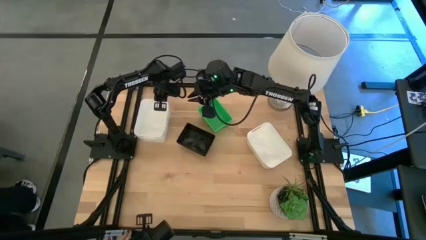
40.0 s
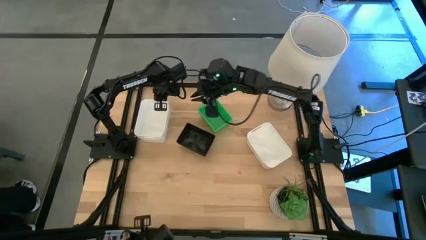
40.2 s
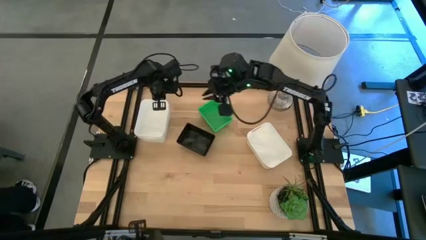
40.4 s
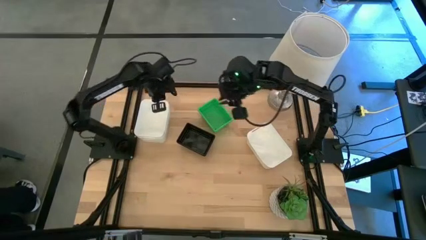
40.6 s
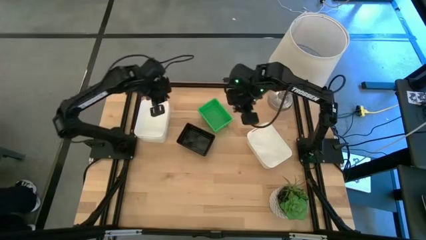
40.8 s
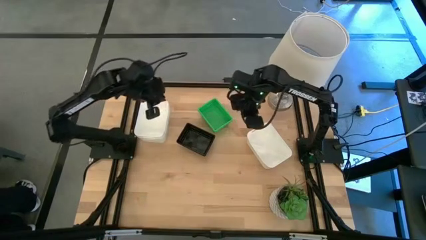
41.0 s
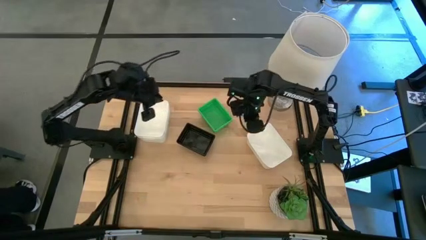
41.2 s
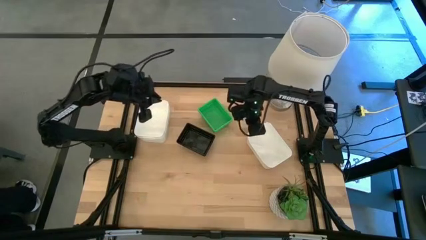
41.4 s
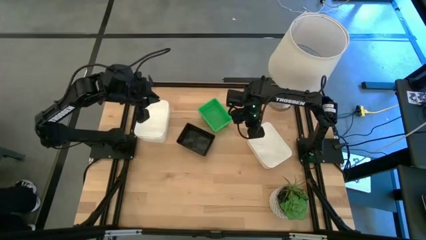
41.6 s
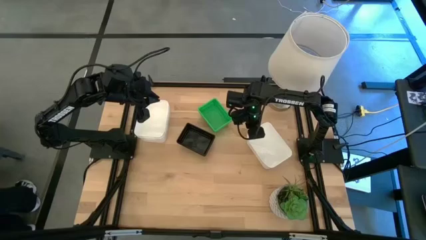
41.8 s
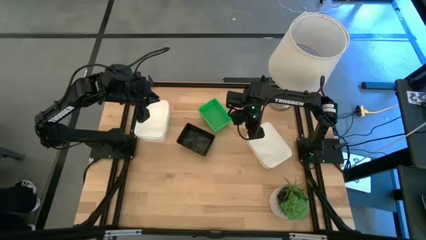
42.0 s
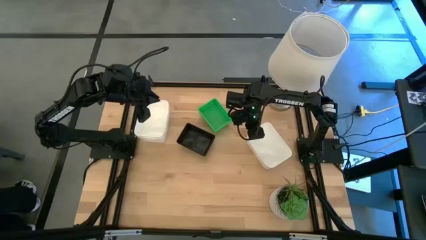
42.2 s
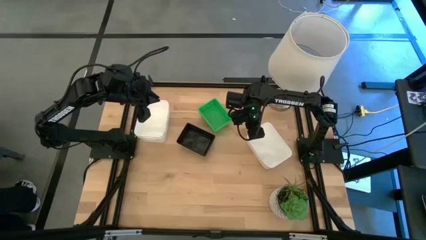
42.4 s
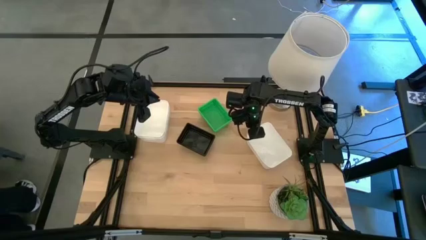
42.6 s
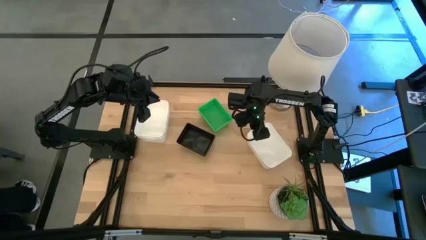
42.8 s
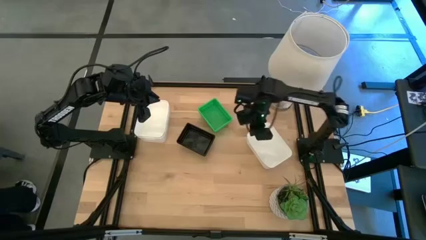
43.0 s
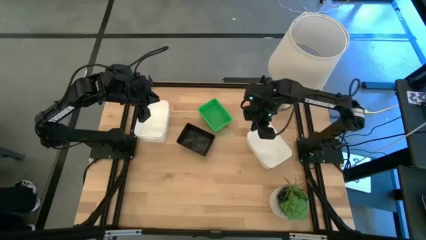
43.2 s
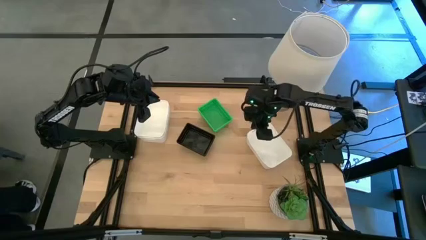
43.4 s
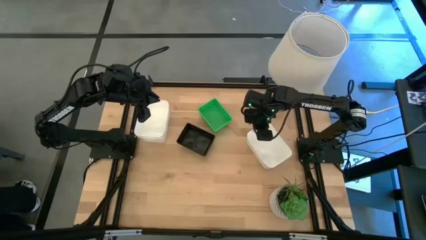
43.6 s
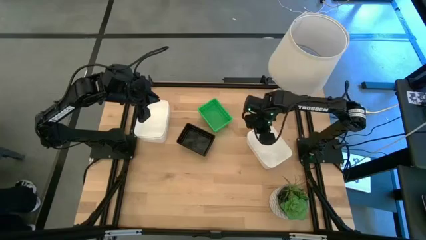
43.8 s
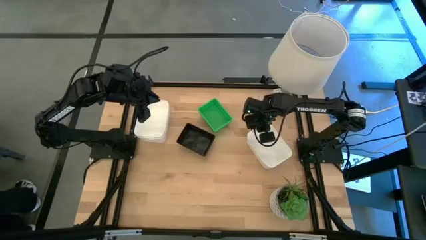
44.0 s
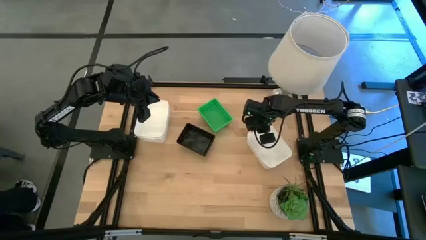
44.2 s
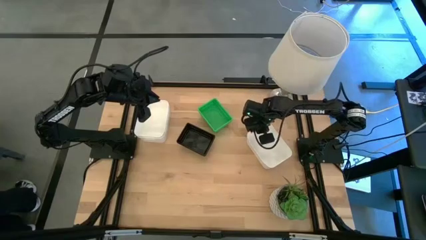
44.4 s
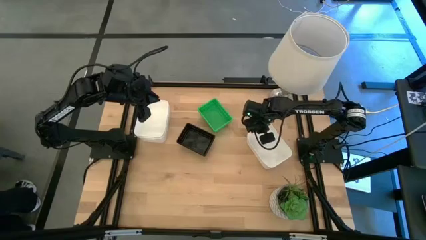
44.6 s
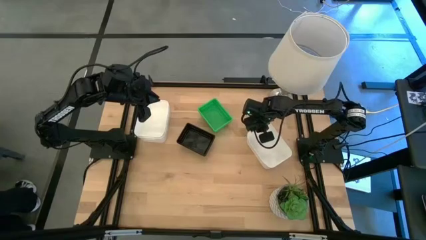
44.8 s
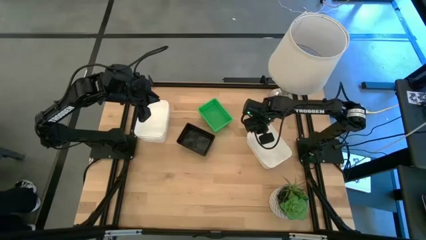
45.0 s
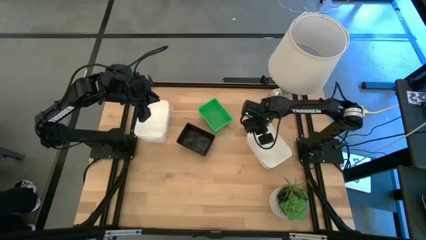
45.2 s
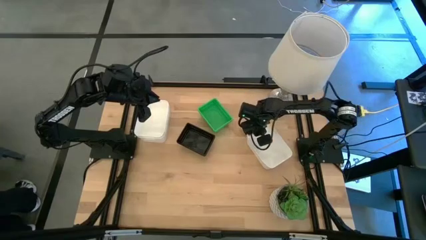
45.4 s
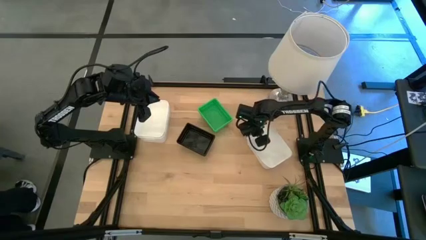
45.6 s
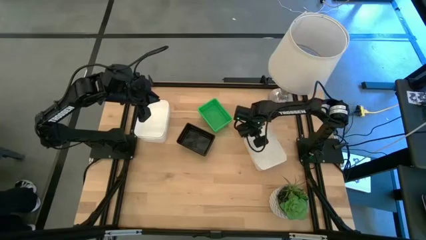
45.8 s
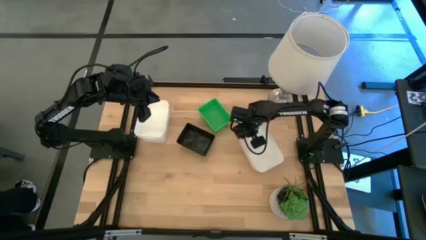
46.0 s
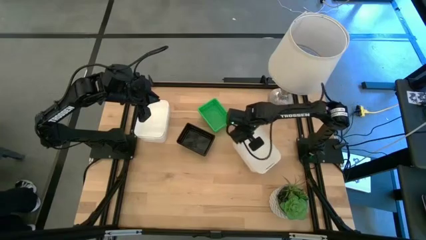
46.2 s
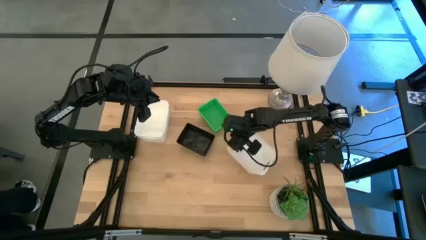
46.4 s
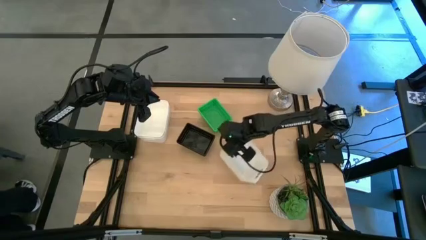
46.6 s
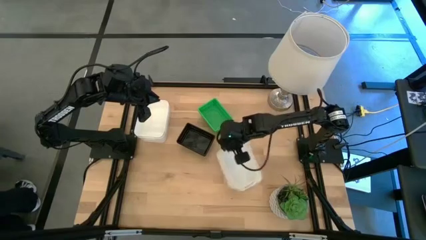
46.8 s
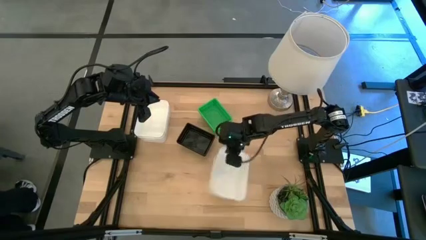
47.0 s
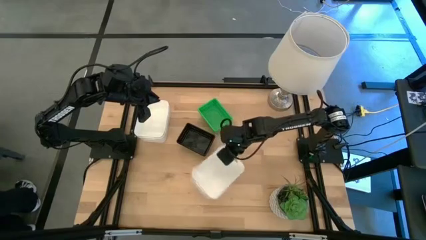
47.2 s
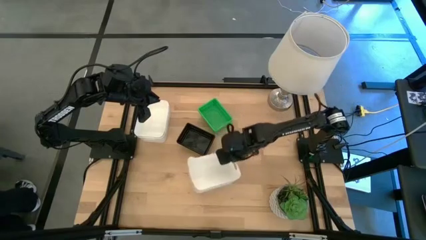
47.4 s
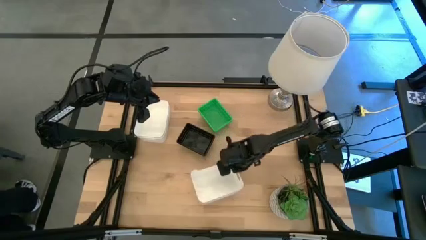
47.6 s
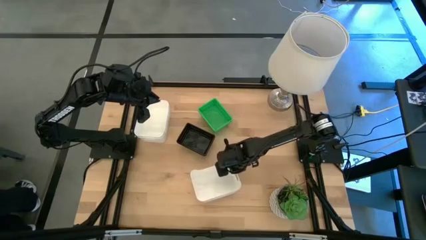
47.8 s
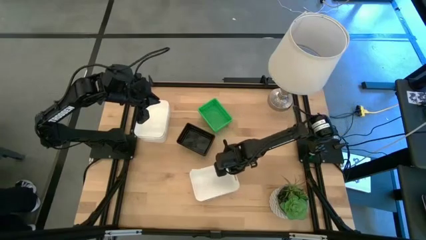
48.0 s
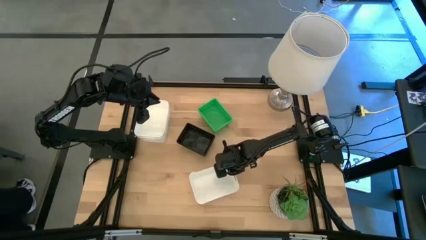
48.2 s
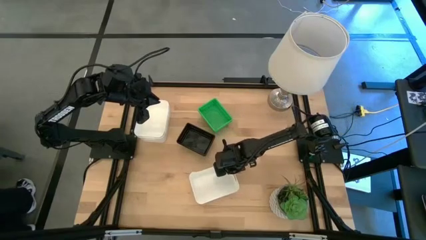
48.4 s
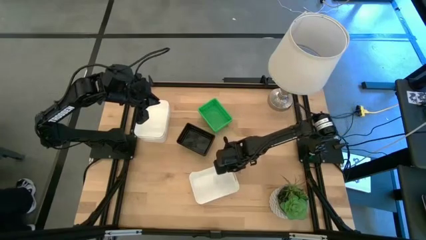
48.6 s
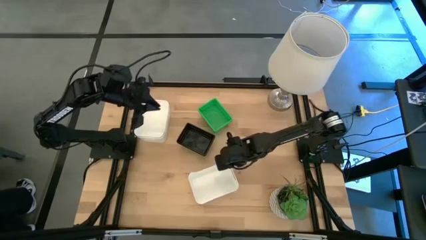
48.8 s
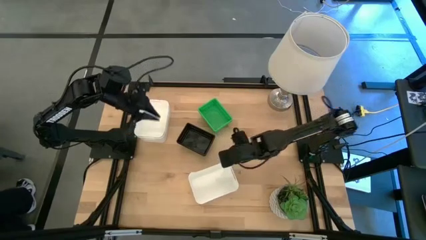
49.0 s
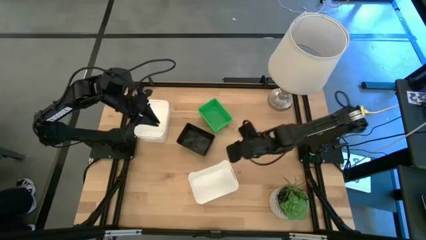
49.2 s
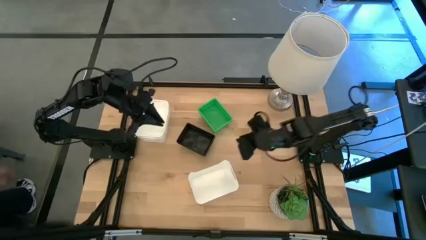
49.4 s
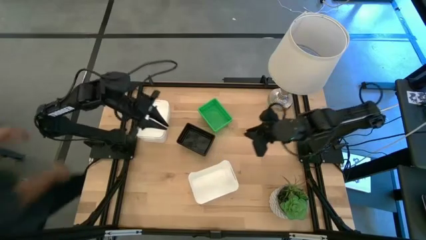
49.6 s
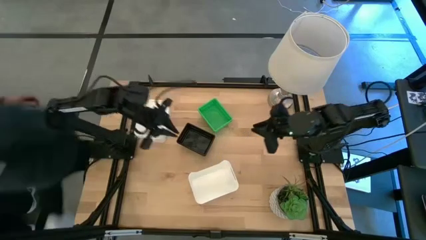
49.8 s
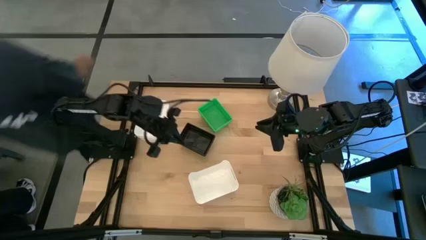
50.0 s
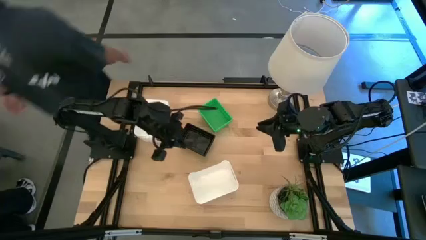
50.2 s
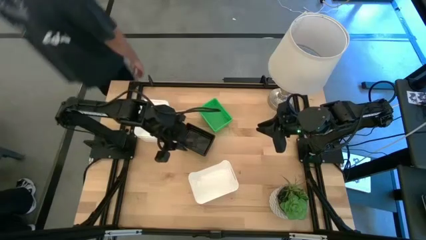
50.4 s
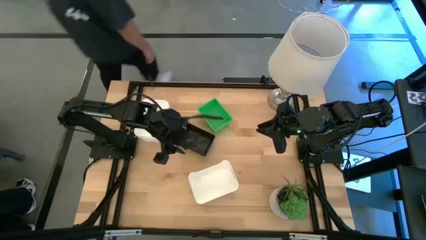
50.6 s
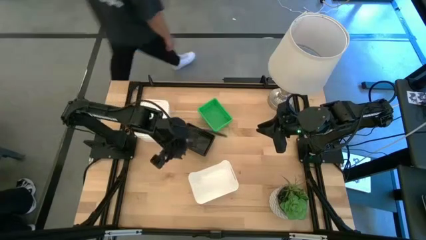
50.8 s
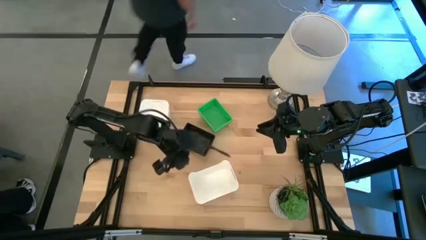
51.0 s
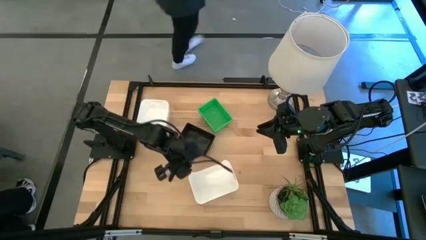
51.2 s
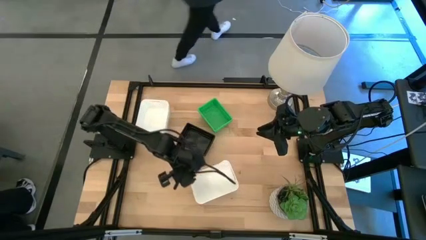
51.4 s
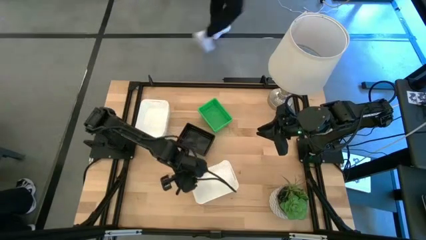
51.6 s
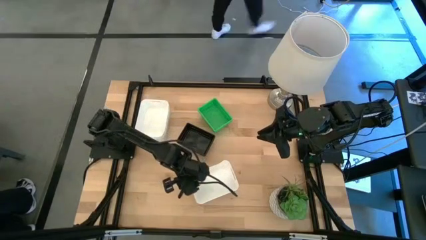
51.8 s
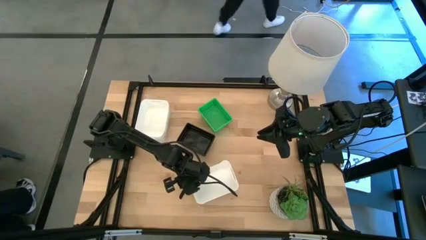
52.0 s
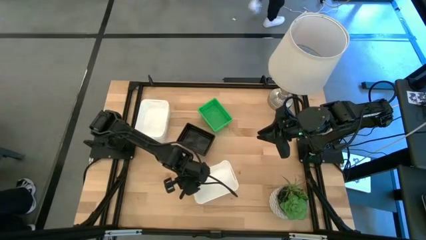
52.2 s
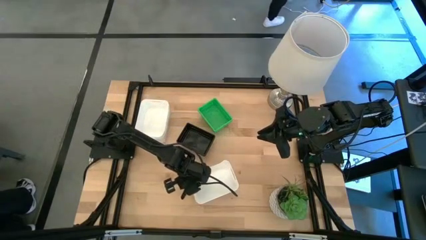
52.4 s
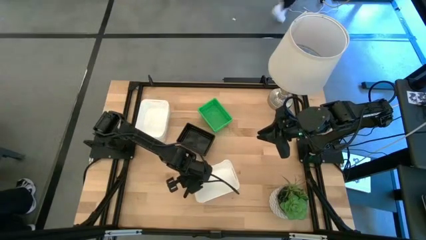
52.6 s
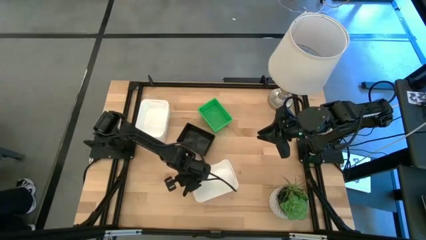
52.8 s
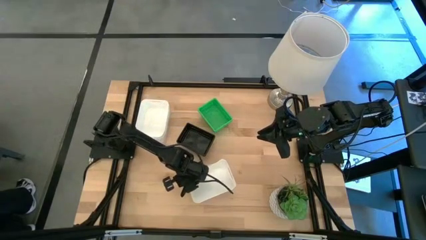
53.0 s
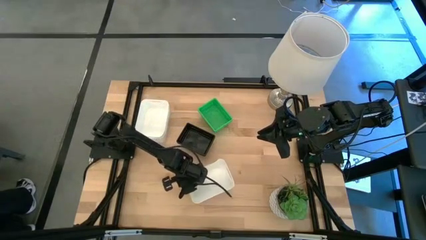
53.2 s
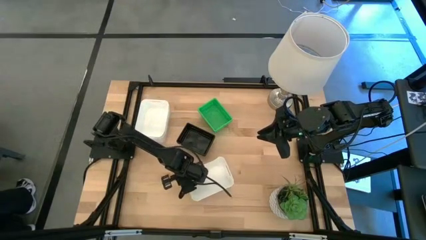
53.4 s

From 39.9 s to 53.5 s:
Stack the right white bin on the left white bins

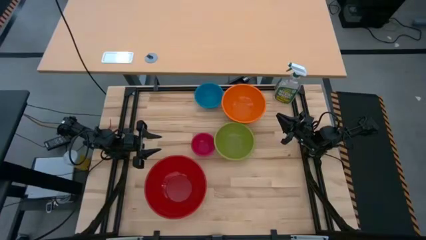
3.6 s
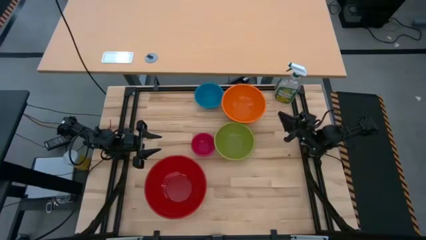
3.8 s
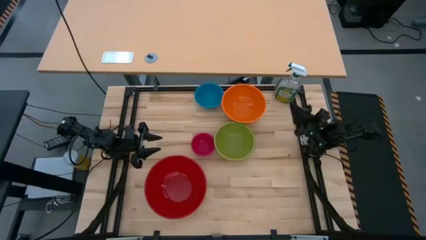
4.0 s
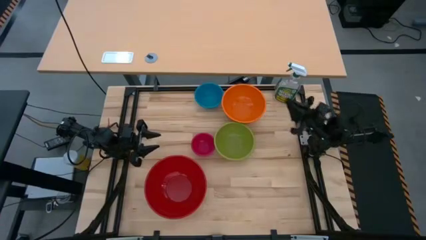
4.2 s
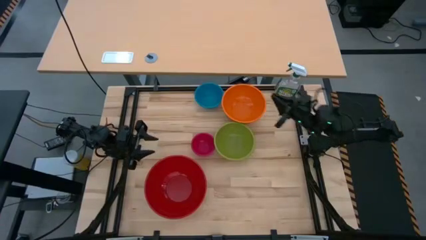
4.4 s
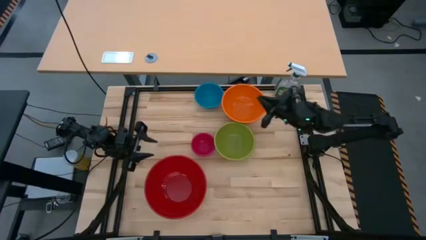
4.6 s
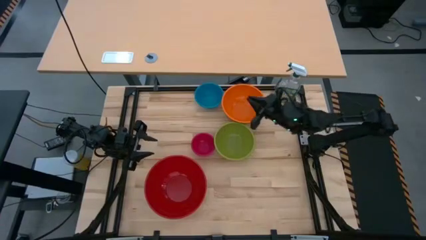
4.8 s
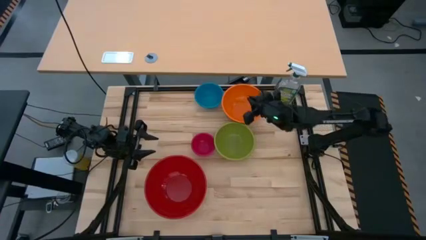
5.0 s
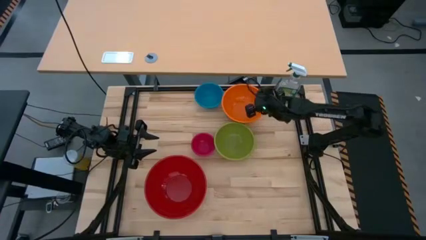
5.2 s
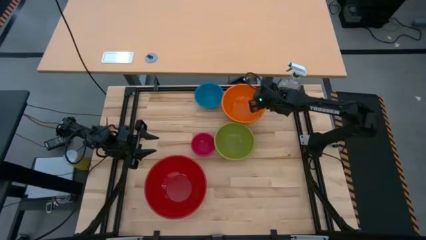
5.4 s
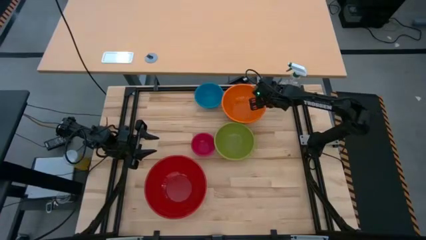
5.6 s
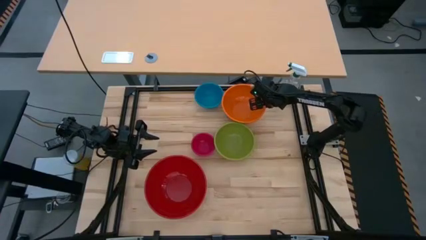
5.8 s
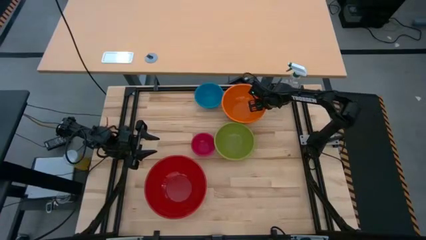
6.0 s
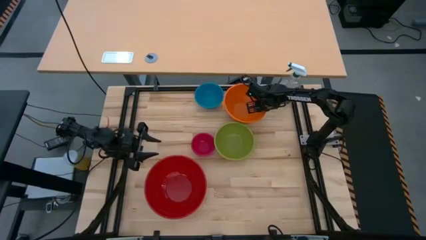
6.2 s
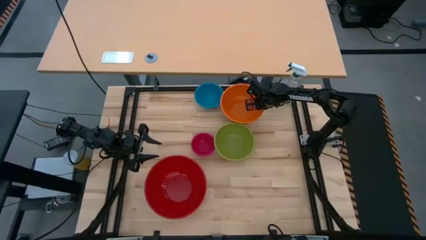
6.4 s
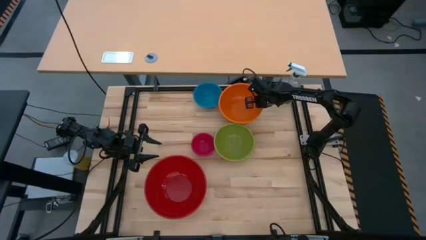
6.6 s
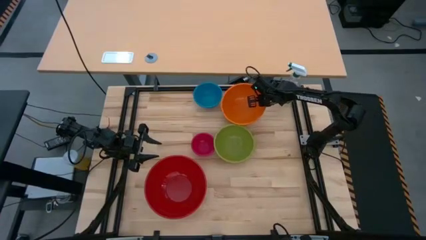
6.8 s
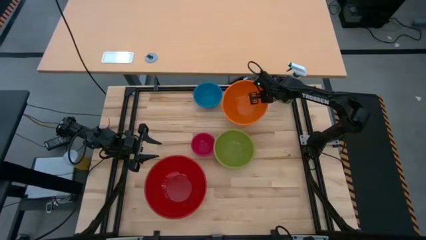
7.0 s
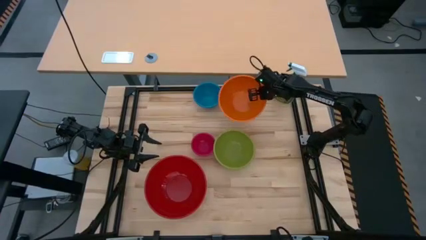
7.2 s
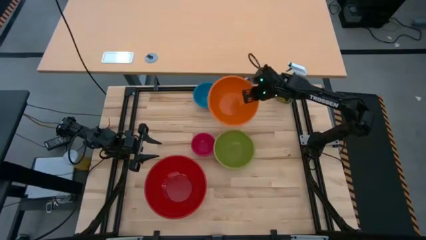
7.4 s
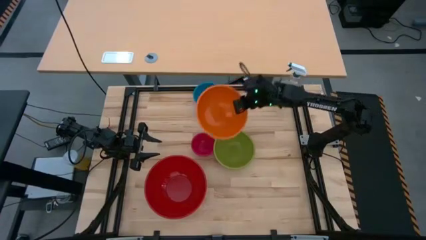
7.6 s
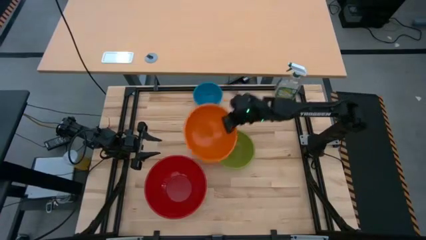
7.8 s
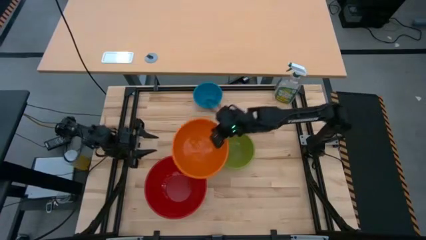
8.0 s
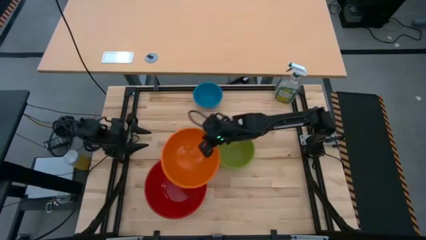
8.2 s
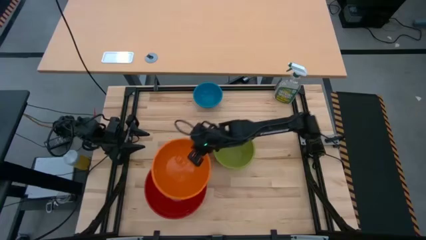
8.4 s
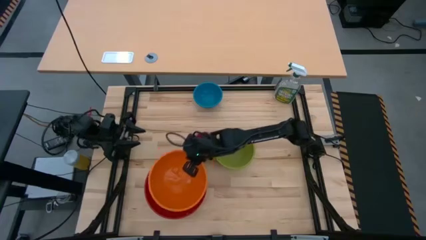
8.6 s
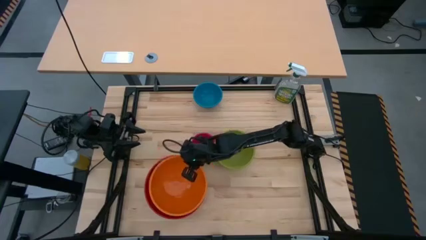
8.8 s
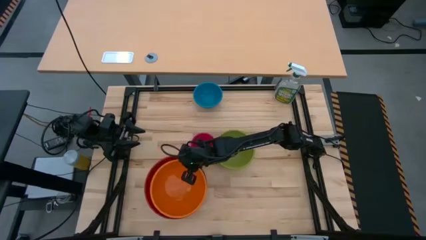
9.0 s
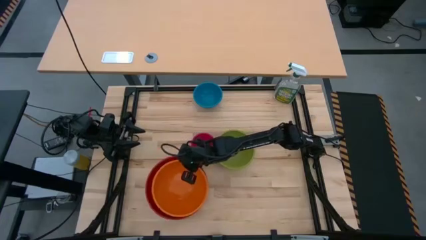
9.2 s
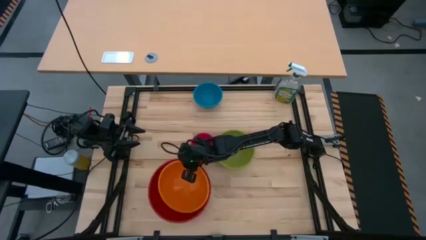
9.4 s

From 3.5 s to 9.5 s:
Stack the orange bowl onto the large red bowl
